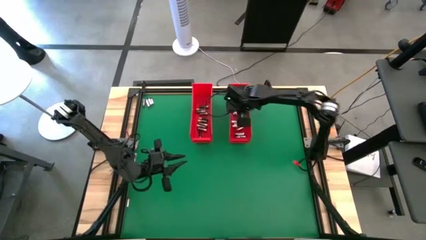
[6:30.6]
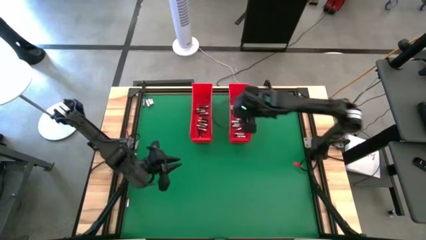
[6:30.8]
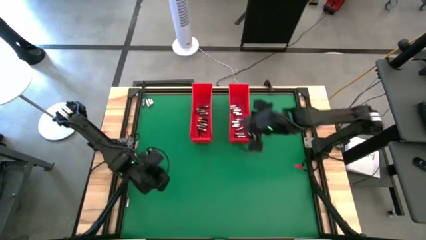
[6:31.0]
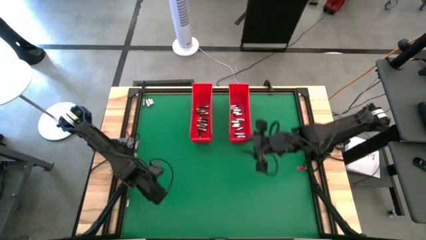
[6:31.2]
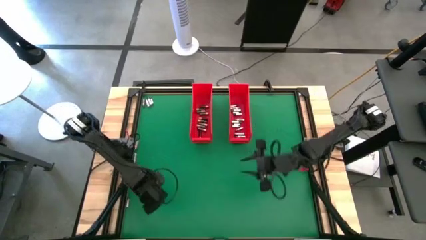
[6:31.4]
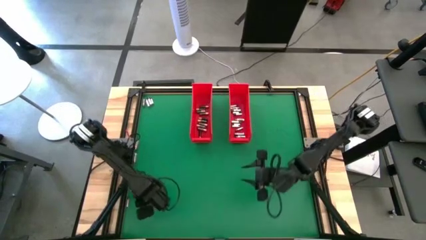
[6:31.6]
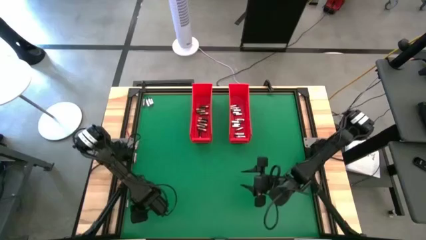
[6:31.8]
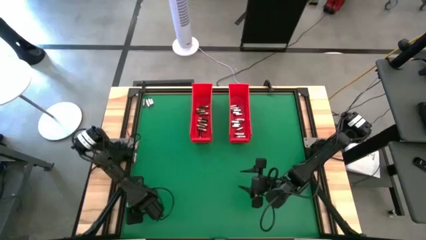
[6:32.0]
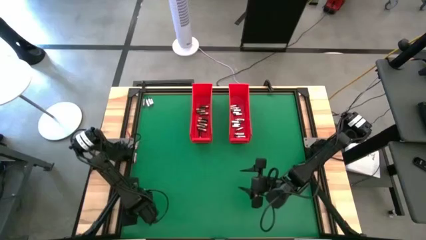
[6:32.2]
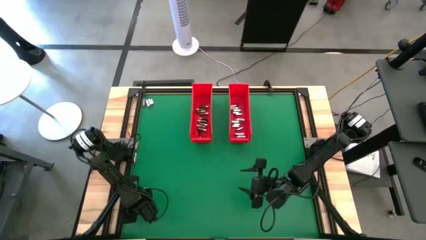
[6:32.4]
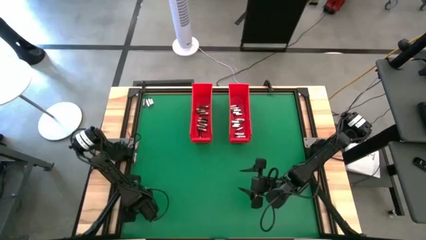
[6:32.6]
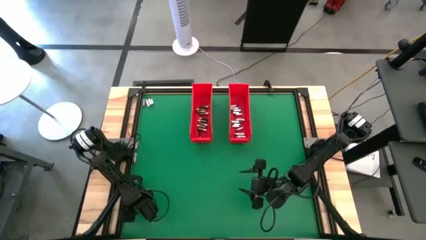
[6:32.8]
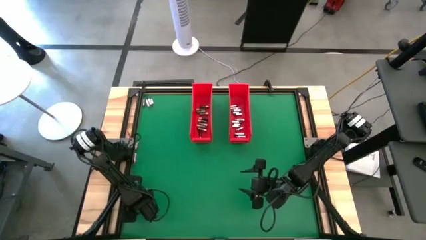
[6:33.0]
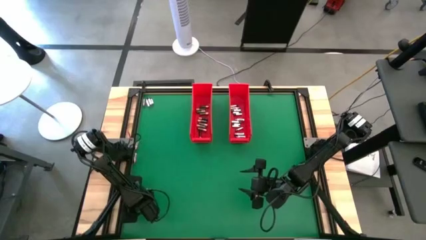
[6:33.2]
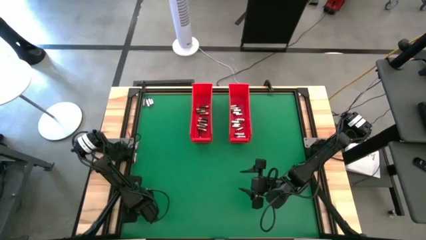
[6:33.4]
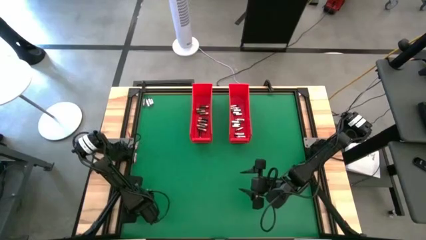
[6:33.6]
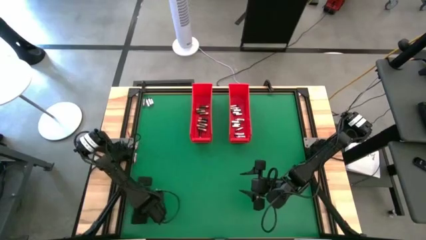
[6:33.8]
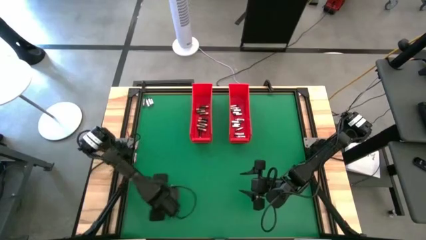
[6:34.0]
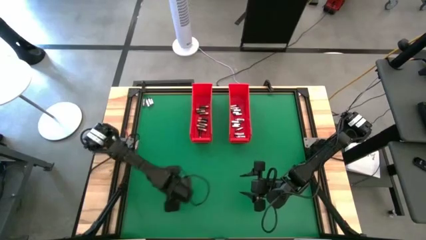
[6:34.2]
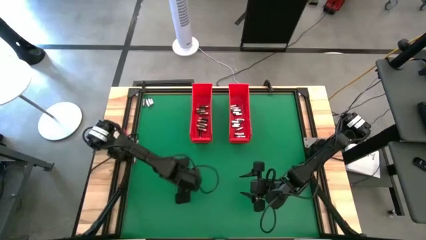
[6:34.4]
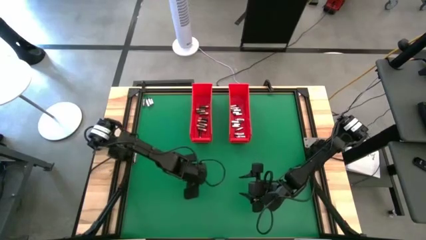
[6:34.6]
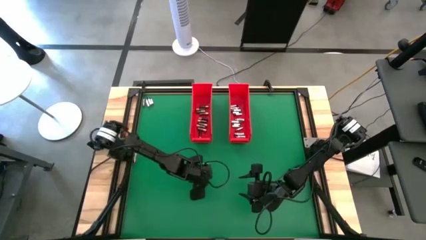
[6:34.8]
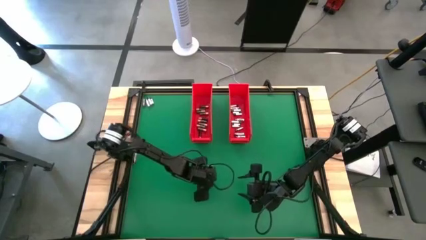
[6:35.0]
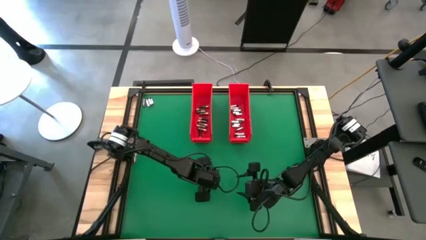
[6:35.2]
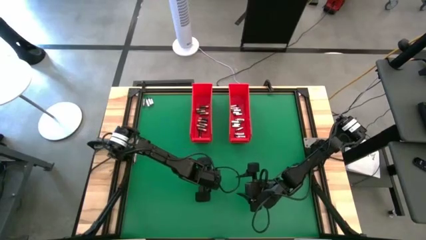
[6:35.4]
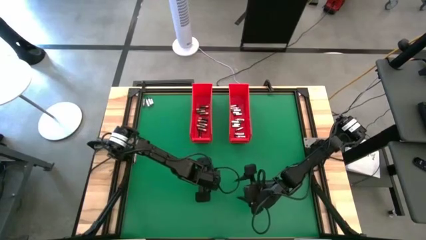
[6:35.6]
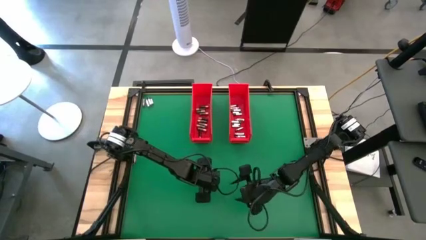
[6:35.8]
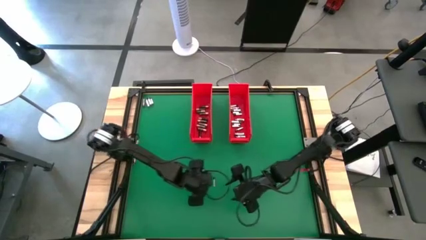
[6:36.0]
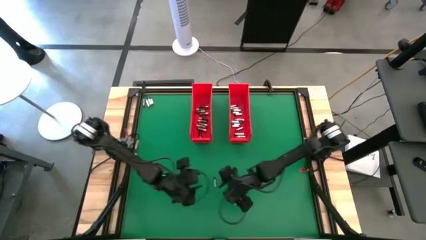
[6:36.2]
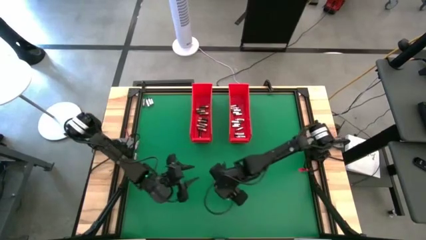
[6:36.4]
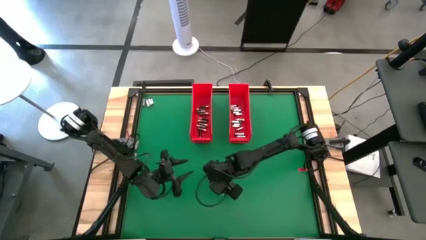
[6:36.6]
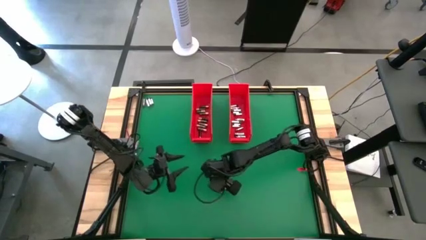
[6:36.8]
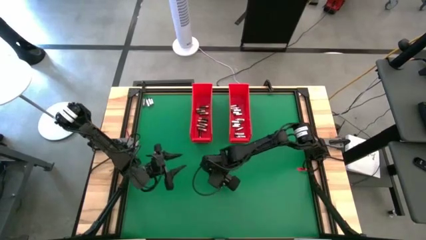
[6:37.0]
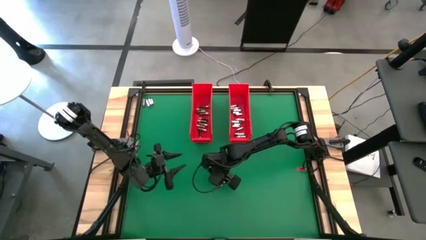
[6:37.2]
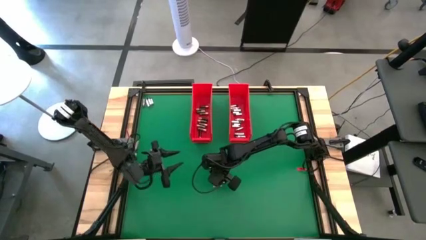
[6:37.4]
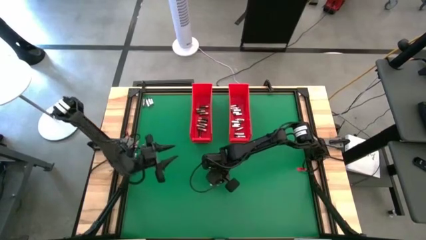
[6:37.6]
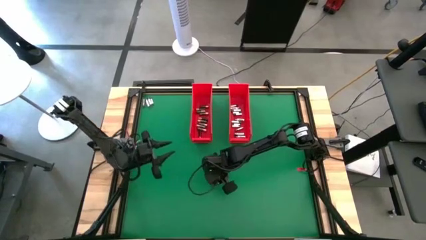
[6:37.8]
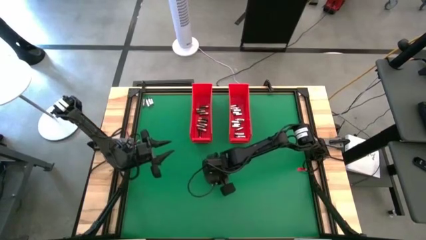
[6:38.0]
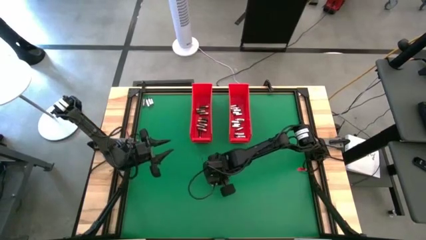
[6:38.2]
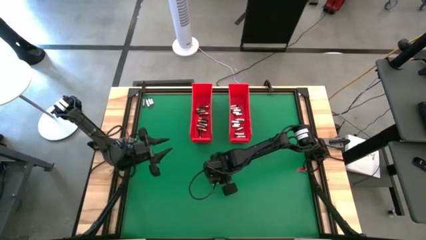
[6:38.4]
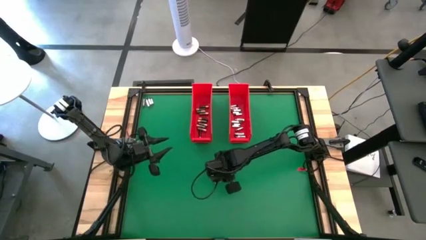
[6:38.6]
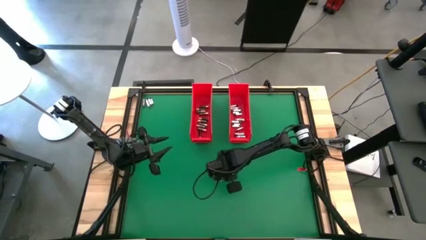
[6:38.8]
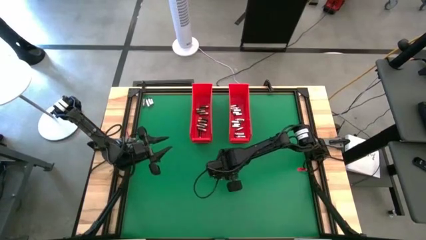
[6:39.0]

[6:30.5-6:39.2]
Task: Sort batteries
Put the silver battery into the right red bin

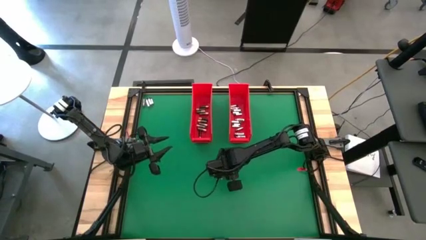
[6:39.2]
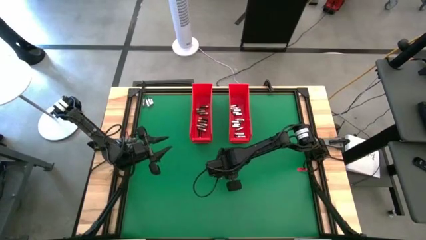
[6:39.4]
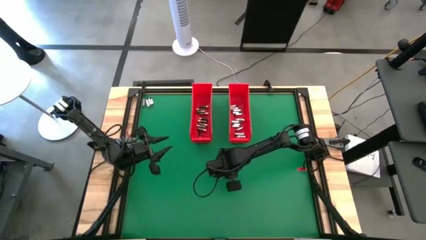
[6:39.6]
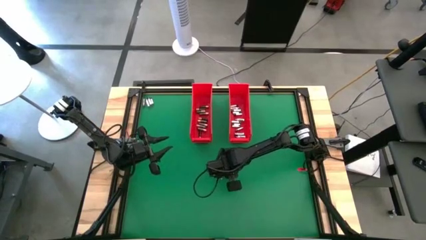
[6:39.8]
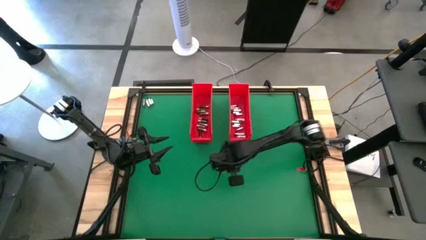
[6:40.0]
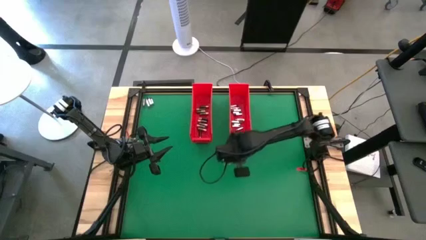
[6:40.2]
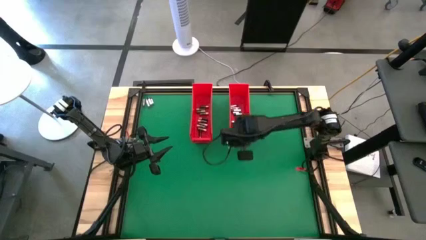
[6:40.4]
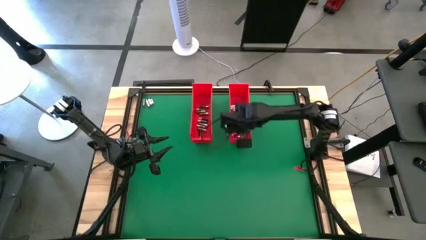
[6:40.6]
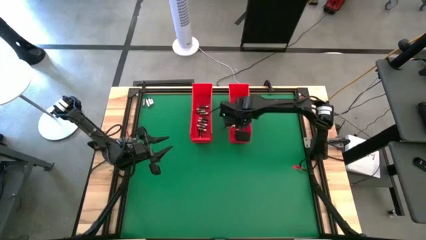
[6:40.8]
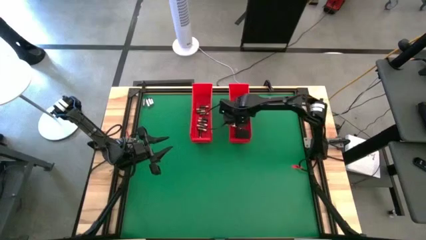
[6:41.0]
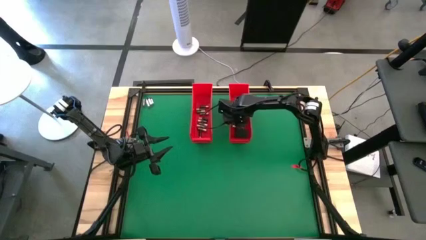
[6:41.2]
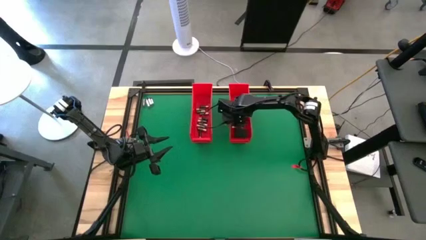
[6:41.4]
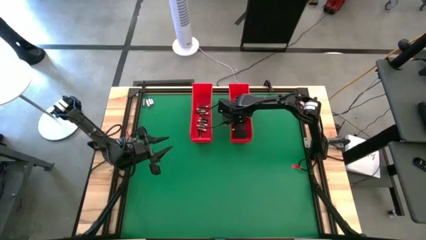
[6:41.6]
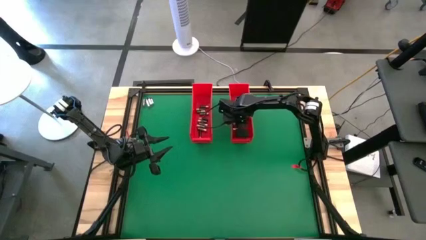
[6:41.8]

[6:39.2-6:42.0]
Put the silver battery into the right red bin

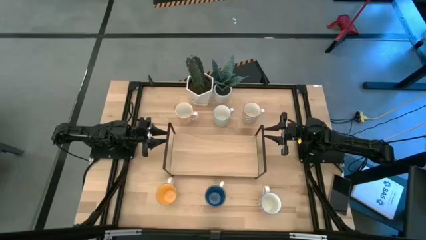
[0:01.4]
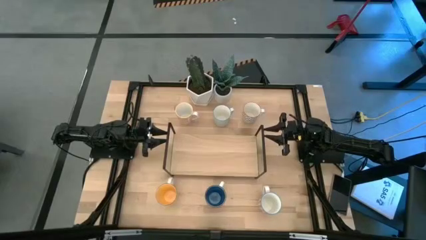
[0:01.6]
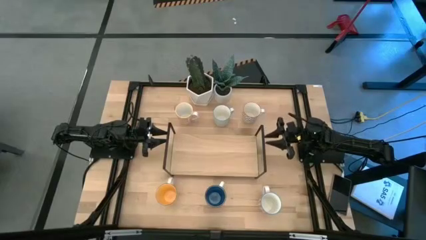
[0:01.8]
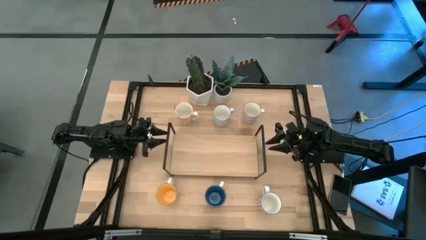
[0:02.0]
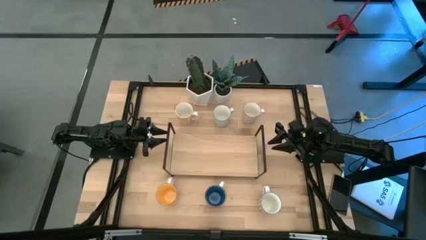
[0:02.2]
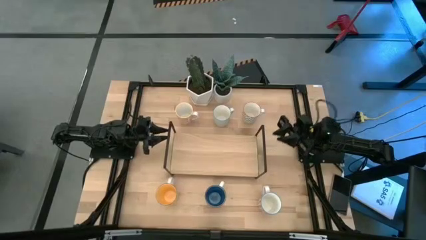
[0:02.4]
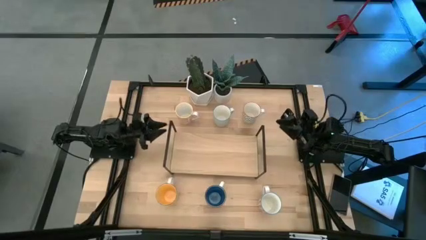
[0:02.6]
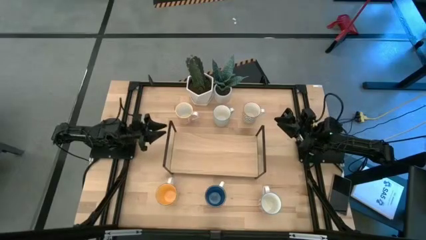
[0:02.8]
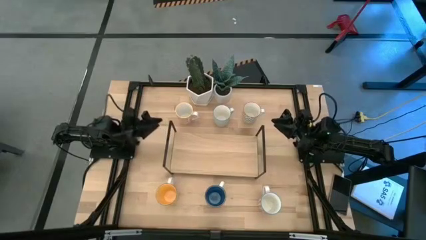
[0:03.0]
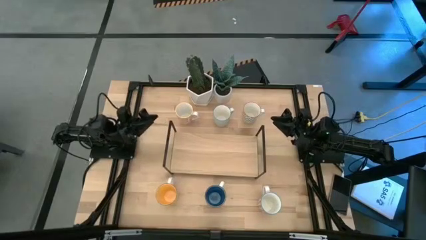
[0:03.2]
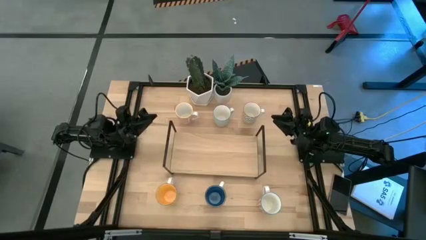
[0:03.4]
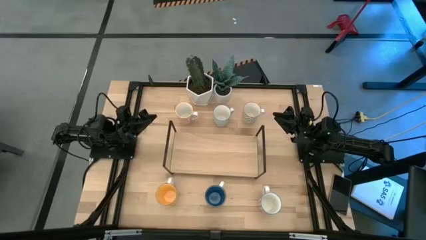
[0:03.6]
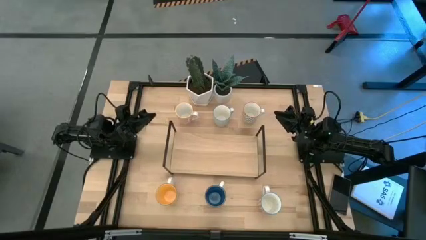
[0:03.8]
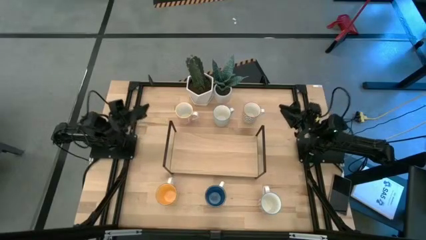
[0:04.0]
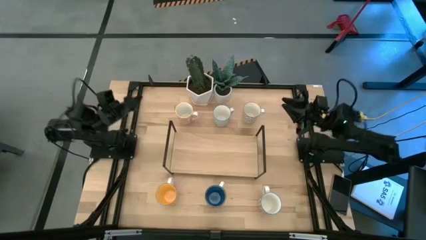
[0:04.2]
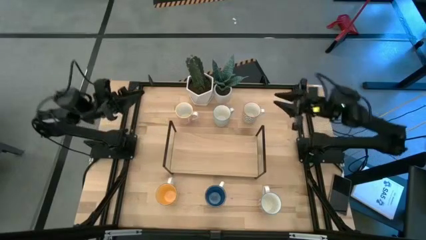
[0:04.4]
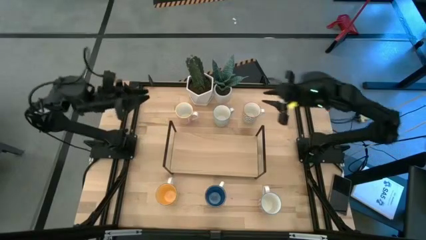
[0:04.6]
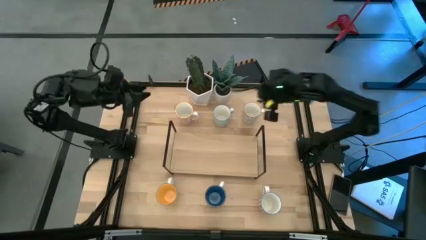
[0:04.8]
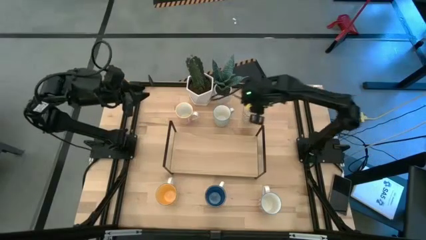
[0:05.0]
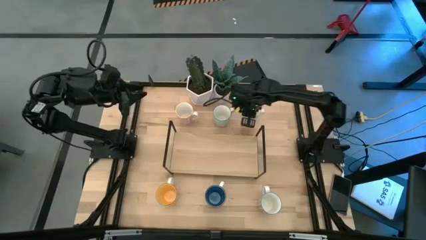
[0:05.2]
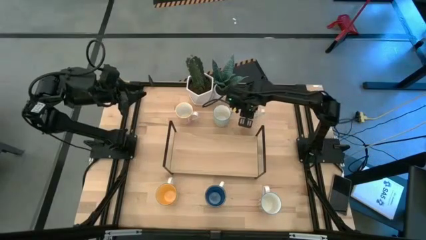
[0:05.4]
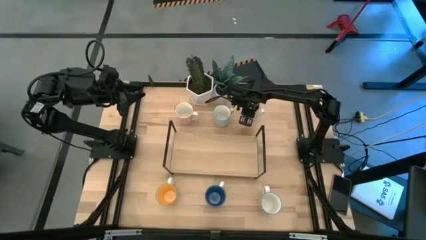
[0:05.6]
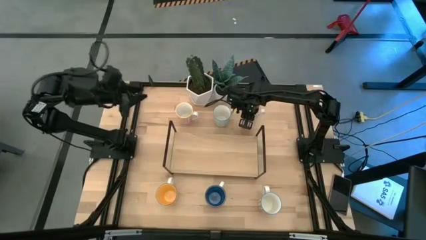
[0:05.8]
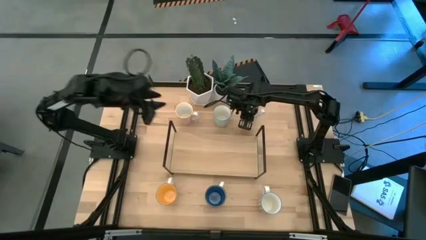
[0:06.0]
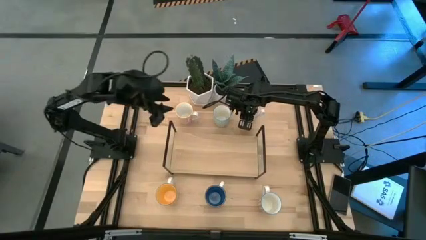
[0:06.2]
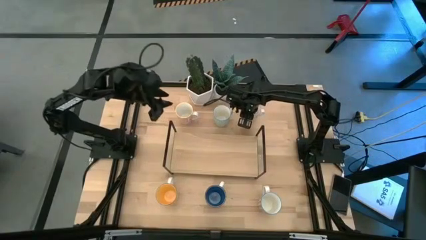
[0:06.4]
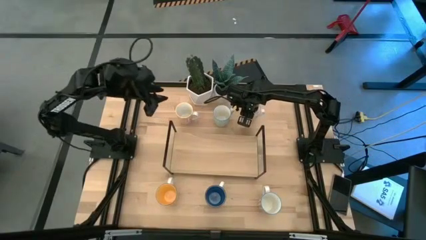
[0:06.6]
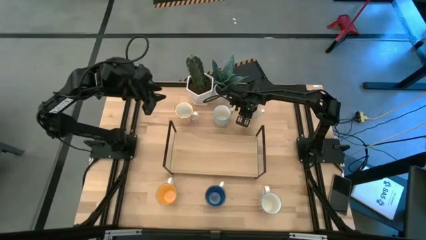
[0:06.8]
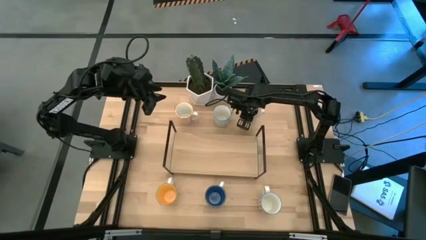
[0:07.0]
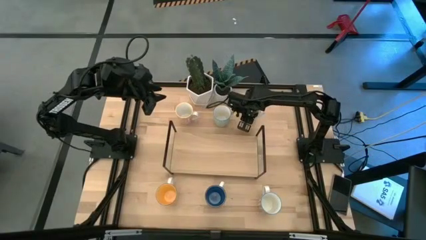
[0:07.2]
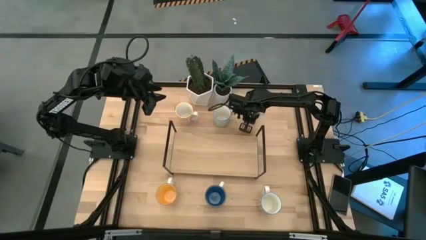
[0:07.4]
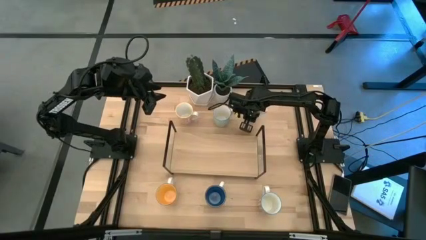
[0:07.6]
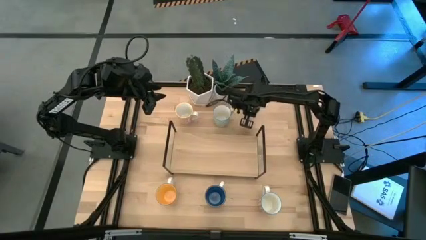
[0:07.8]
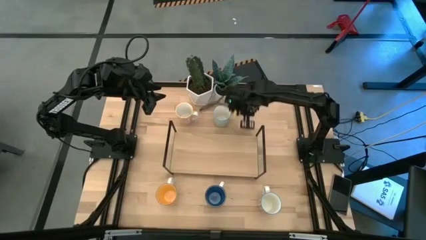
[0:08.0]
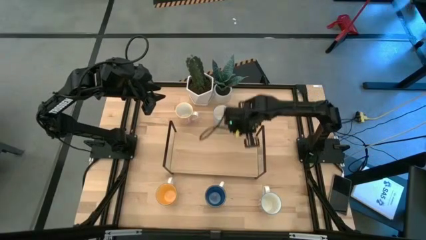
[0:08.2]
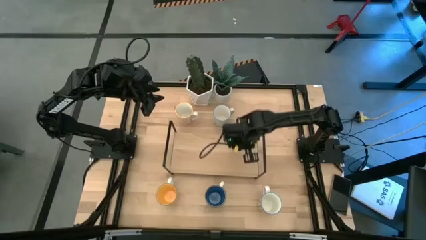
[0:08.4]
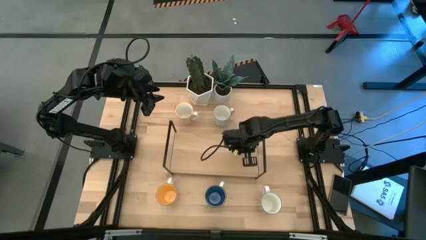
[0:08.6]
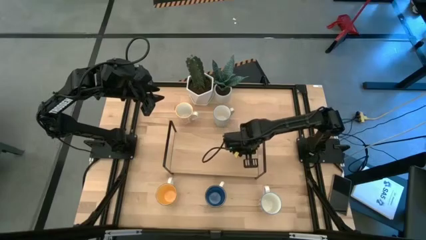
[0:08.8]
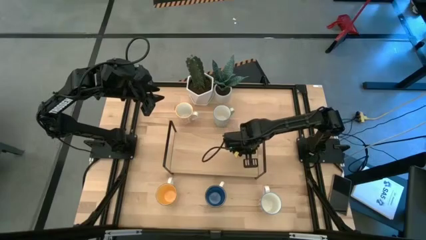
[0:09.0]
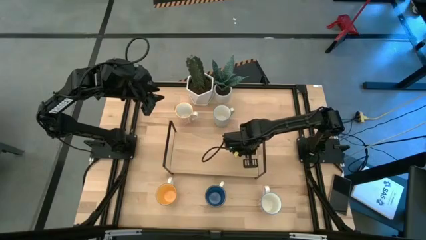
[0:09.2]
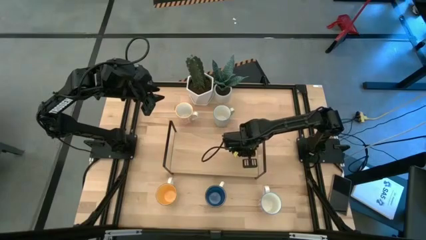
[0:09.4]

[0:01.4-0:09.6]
Task: Place coffee mugs
Put the white-red mug on the shelf
